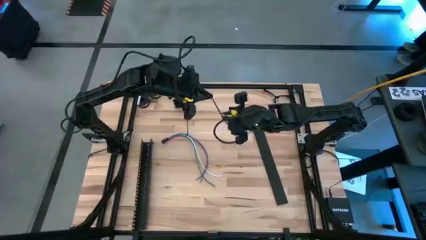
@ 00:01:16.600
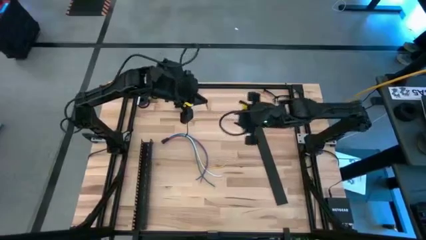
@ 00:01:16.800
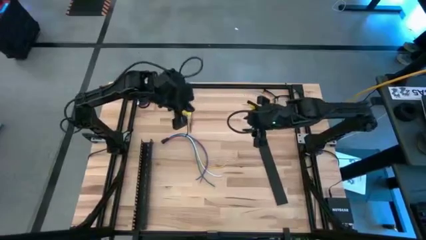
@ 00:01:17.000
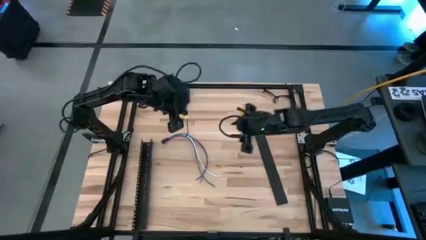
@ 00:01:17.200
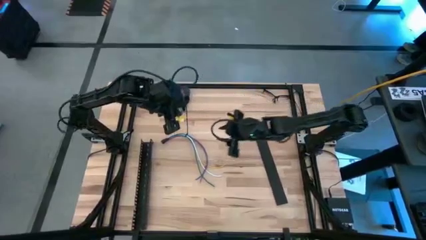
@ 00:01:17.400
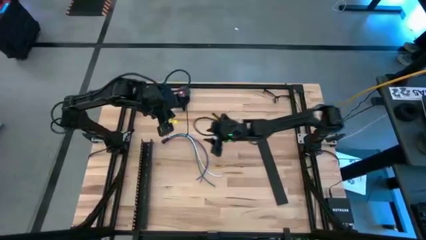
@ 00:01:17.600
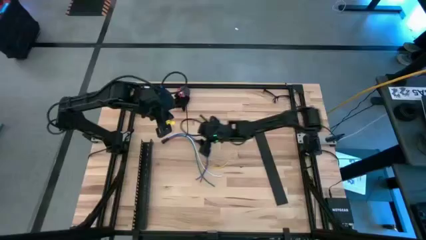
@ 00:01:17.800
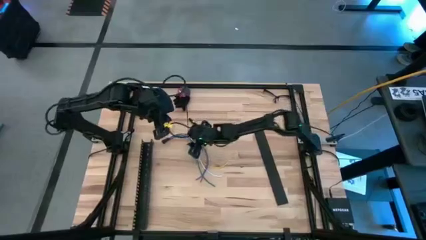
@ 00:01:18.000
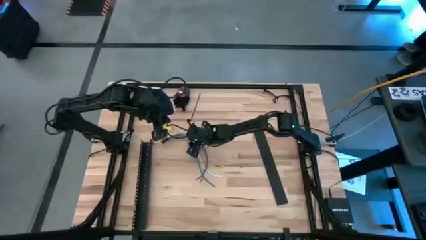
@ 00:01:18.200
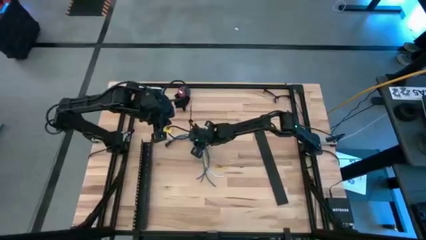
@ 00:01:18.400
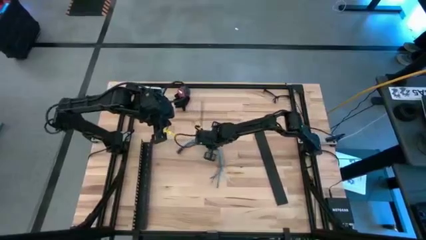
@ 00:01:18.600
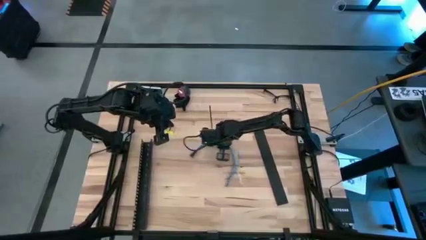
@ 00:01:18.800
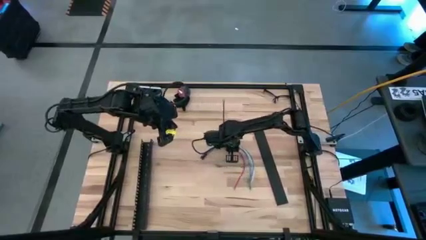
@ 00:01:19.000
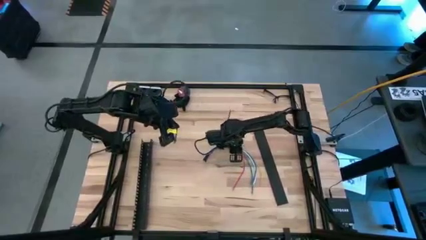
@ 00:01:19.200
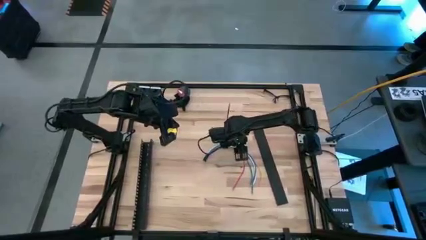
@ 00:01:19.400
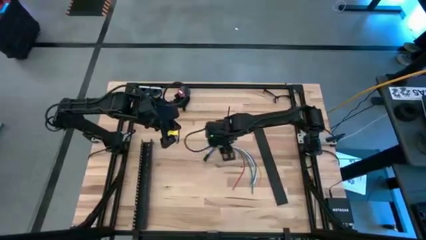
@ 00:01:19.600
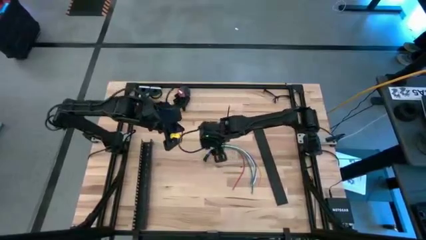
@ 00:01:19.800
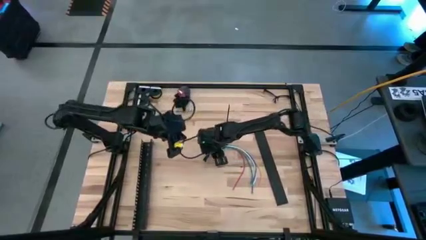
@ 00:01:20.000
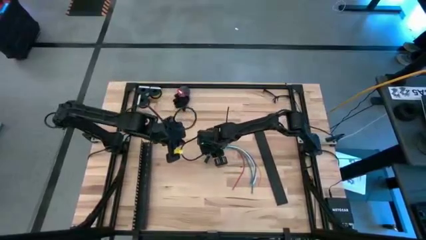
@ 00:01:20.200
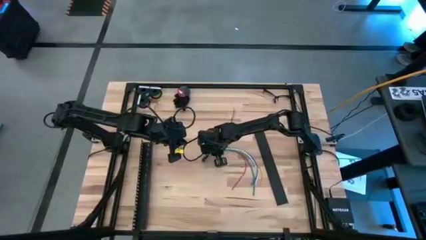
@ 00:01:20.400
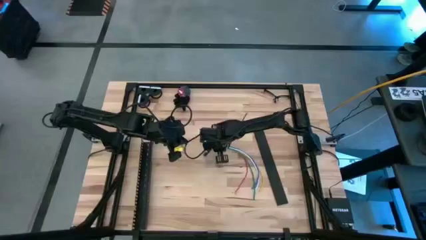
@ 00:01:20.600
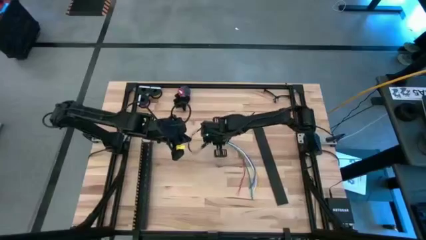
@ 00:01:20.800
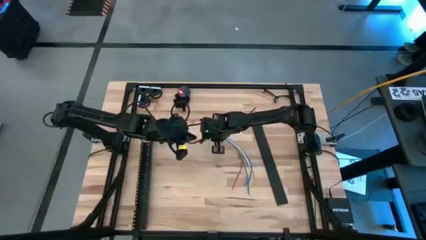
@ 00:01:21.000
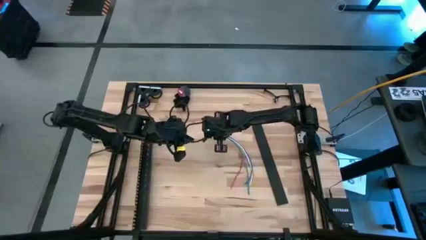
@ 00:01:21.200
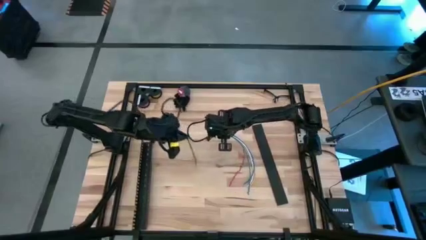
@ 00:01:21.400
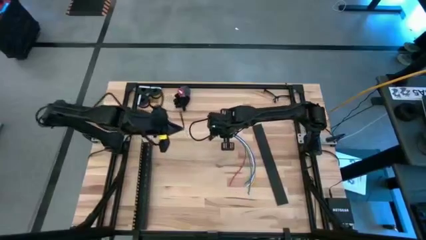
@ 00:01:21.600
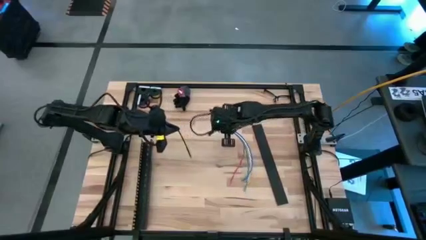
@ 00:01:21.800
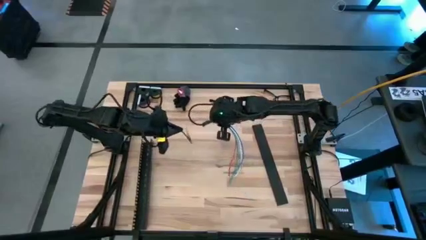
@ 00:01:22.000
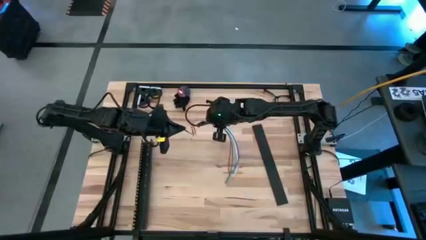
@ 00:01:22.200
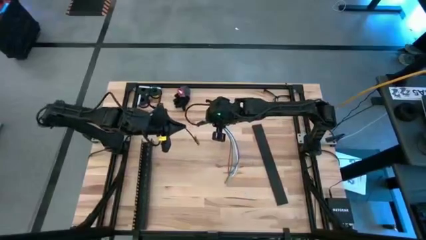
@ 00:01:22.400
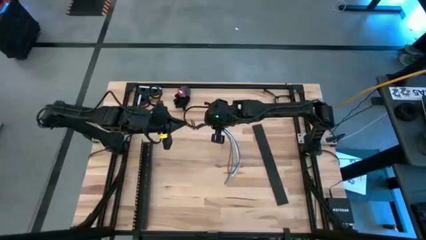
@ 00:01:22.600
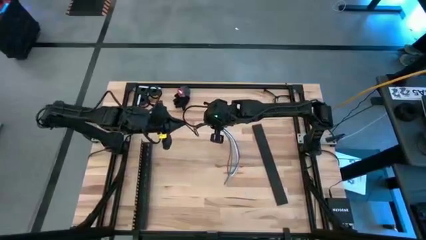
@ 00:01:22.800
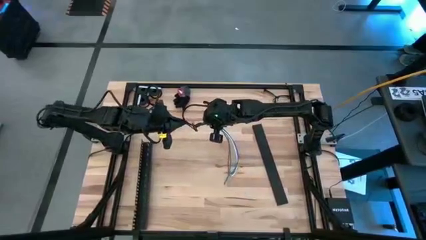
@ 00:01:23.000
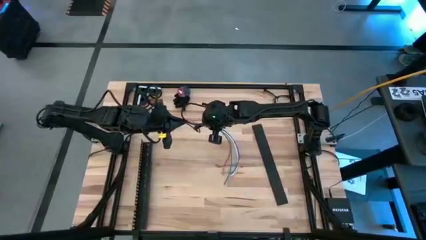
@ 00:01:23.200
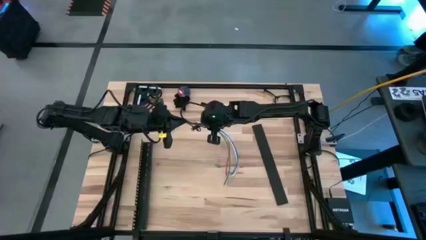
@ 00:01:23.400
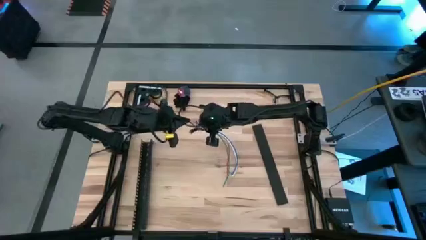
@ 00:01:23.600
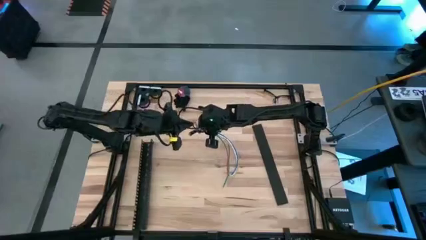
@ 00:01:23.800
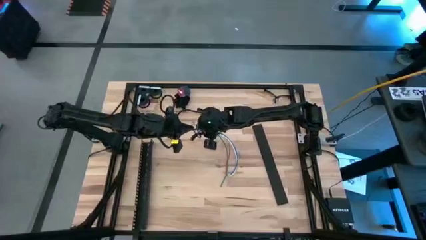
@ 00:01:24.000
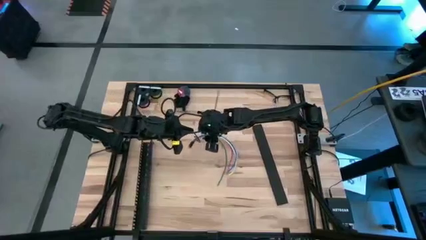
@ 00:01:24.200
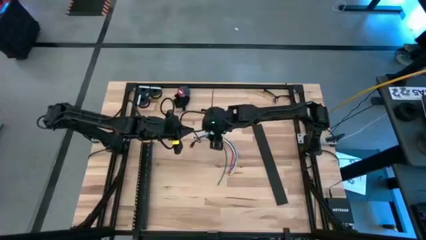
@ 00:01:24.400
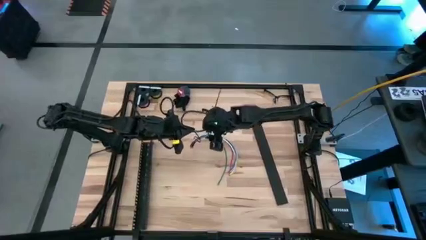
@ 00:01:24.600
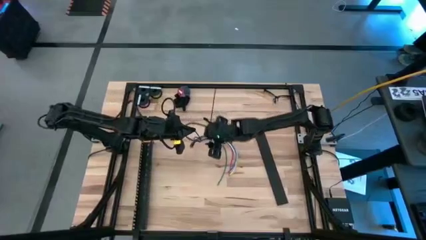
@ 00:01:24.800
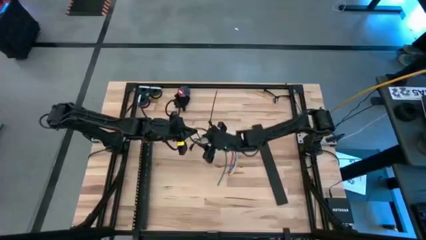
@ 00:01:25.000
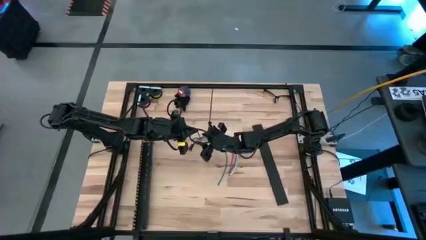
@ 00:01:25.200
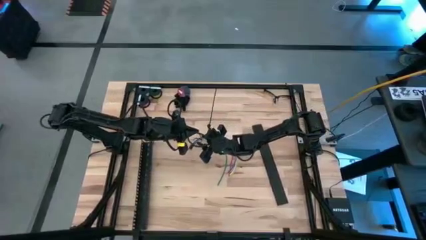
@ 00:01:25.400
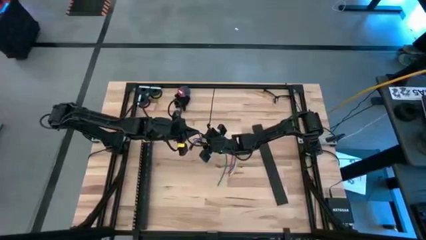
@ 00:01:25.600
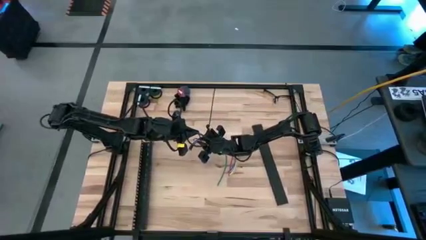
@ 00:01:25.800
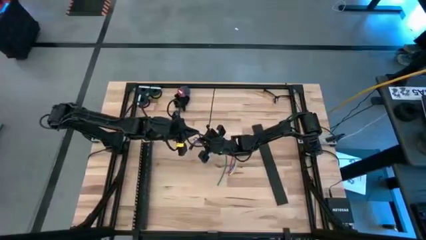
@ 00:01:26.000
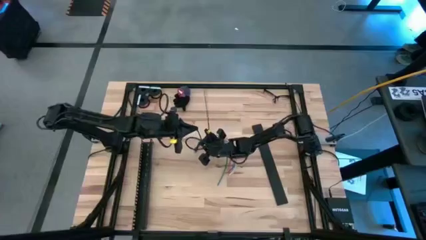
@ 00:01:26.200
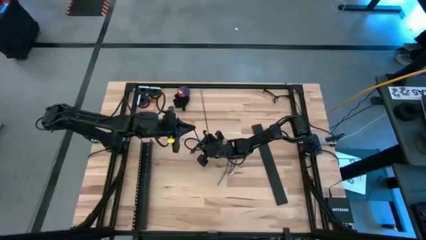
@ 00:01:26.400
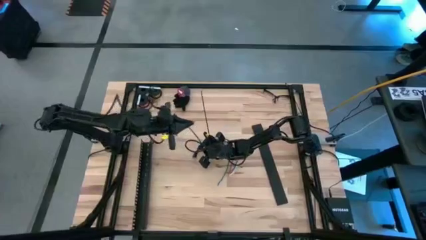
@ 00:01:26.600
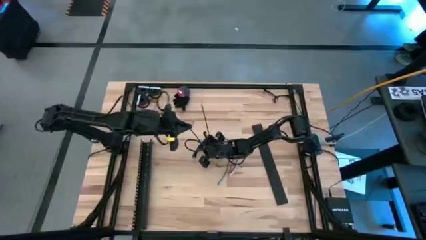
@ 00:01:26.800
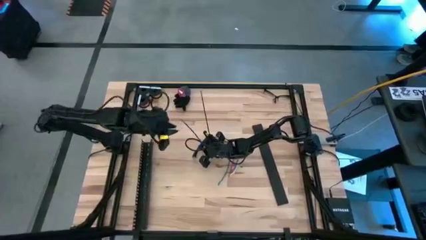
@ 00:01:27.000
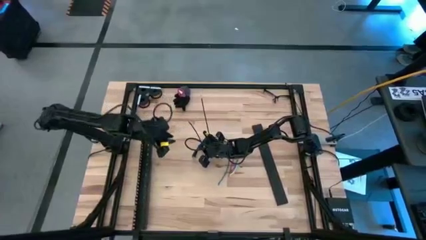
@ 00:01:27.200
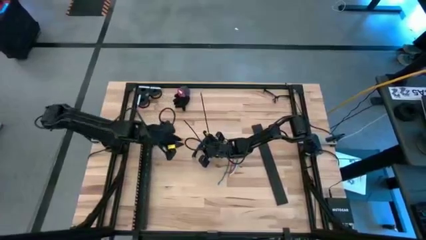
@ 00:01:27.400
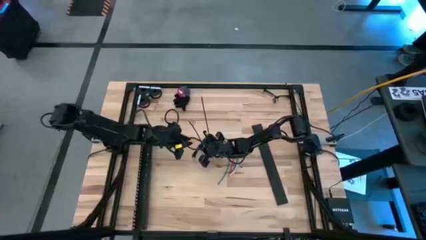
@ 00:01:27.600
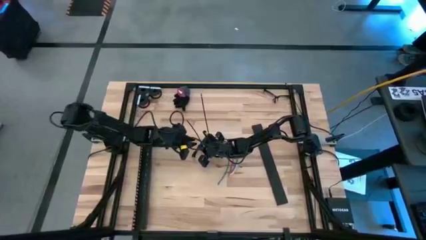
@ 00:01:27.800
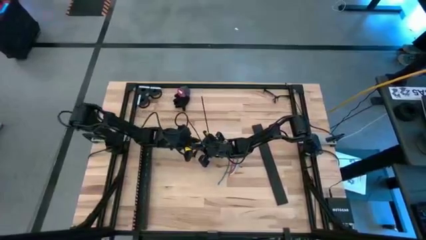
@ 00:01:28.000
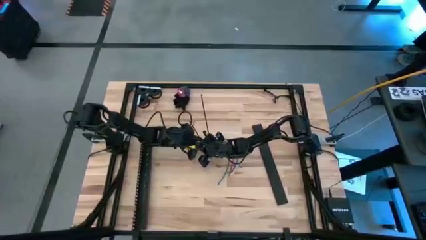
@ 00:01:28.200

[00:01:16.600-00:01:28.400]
Task: Ziptie cables
Wrap the black zip tie loop on the cables
